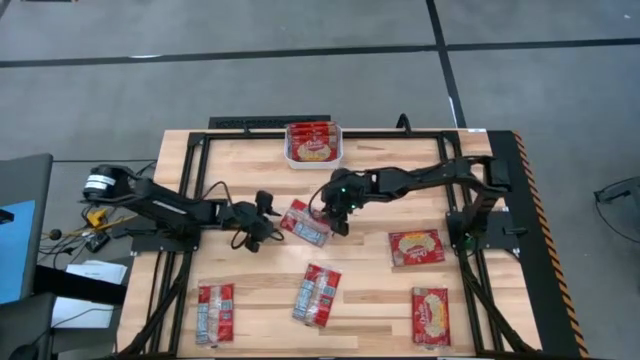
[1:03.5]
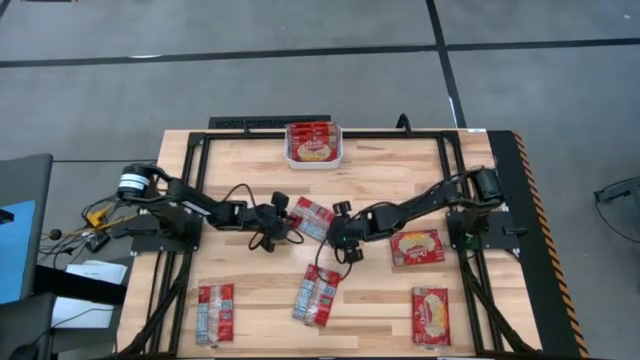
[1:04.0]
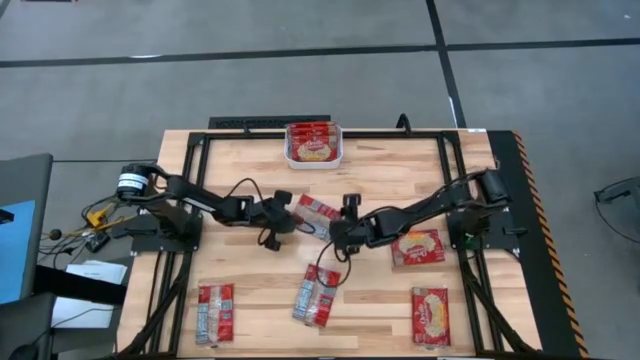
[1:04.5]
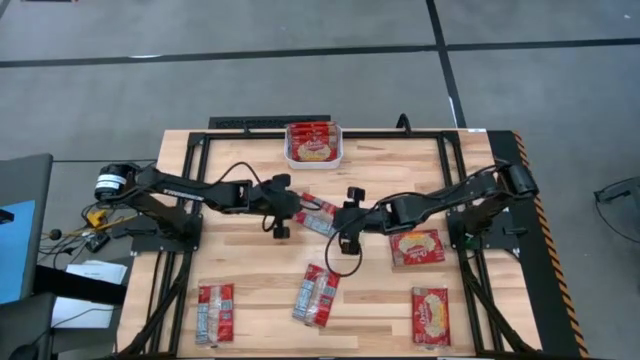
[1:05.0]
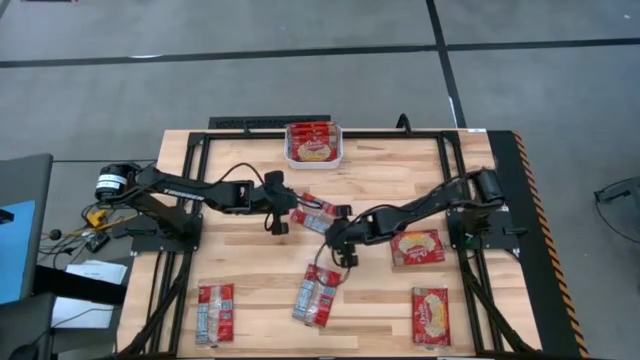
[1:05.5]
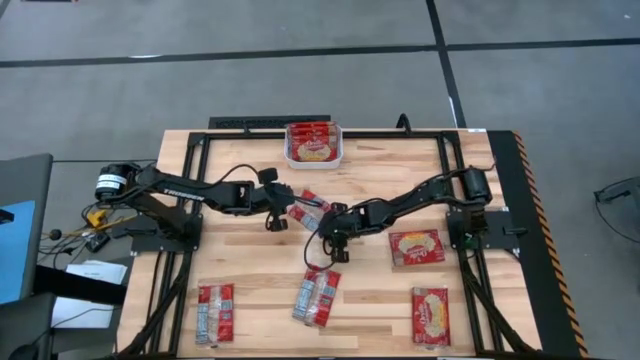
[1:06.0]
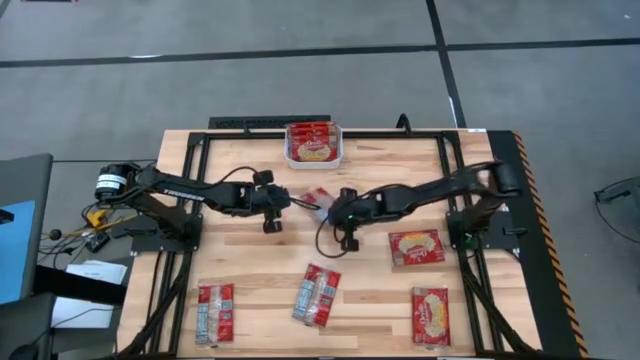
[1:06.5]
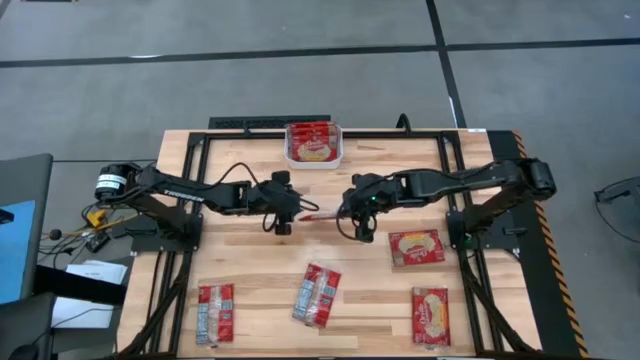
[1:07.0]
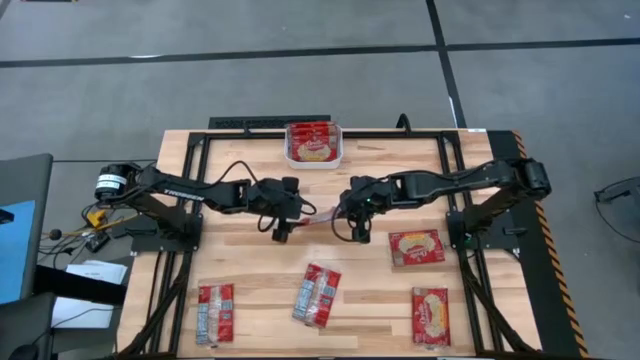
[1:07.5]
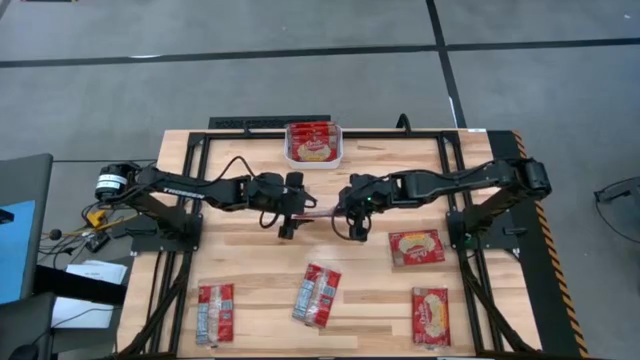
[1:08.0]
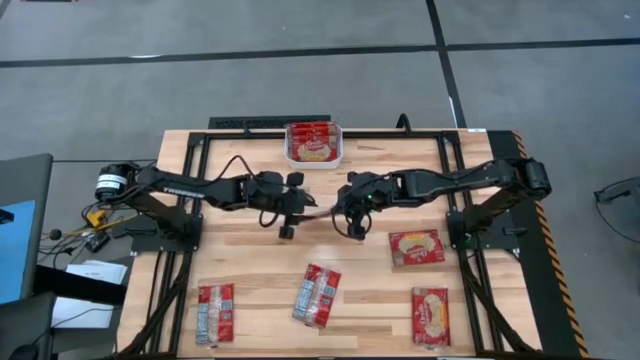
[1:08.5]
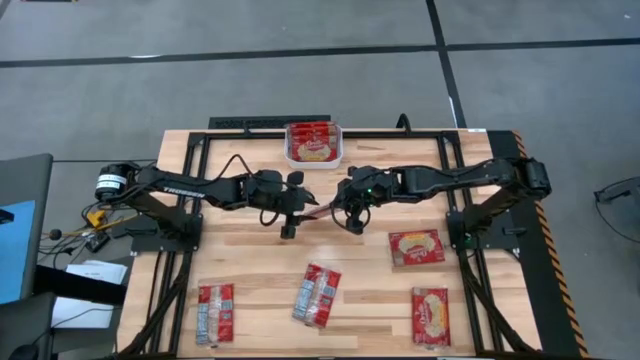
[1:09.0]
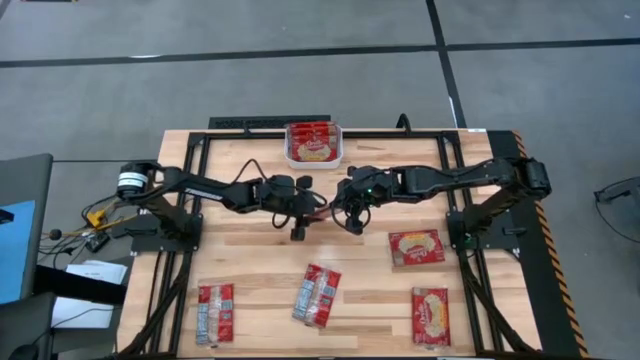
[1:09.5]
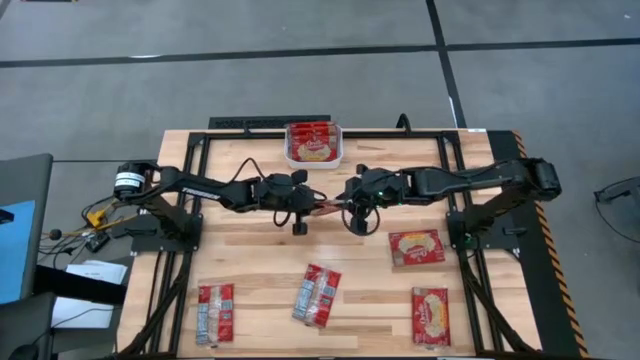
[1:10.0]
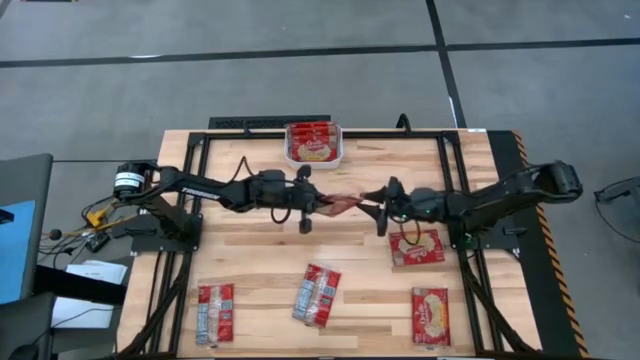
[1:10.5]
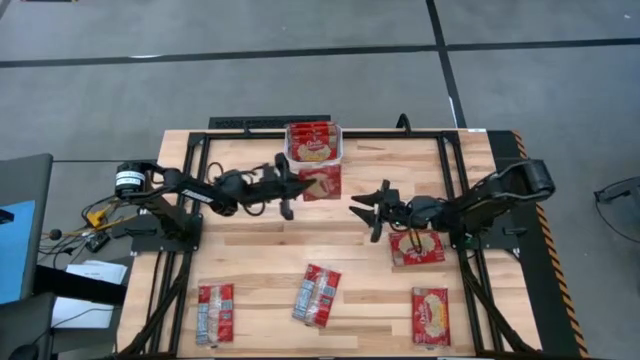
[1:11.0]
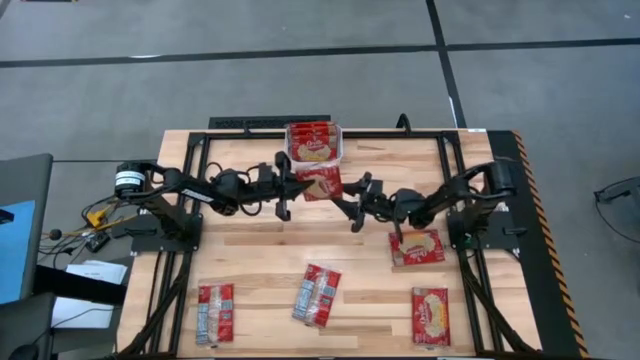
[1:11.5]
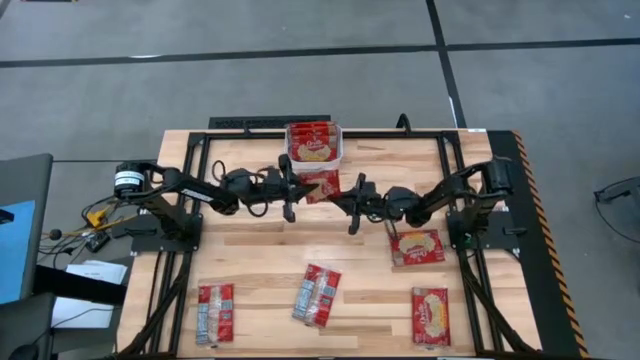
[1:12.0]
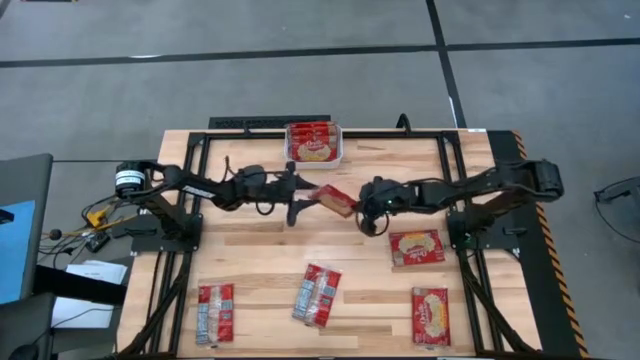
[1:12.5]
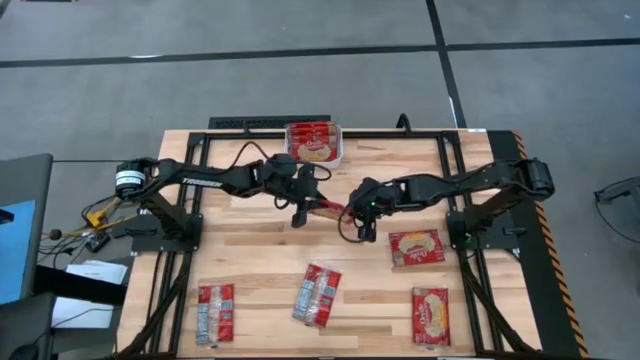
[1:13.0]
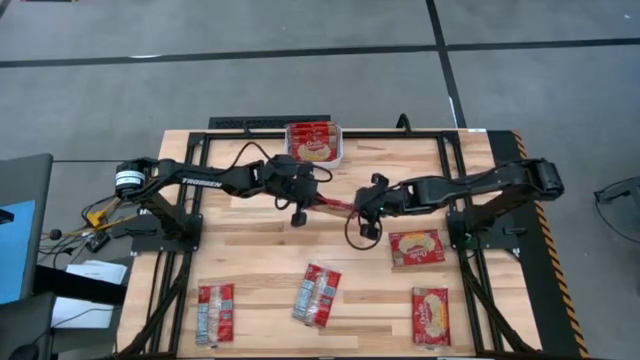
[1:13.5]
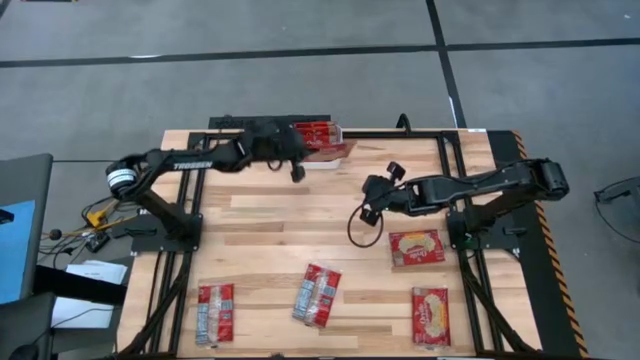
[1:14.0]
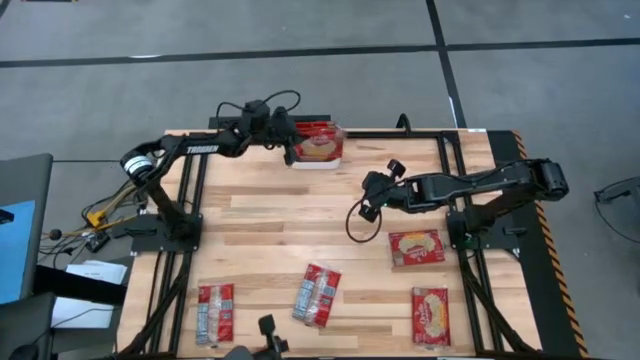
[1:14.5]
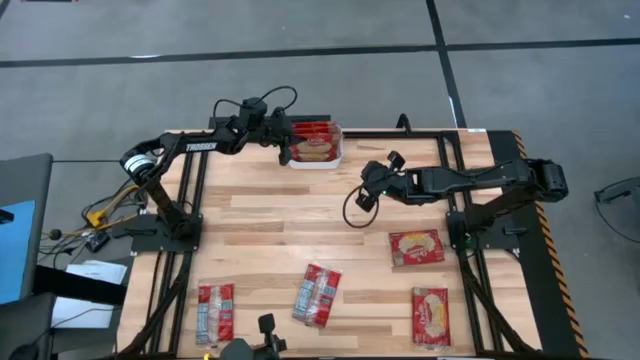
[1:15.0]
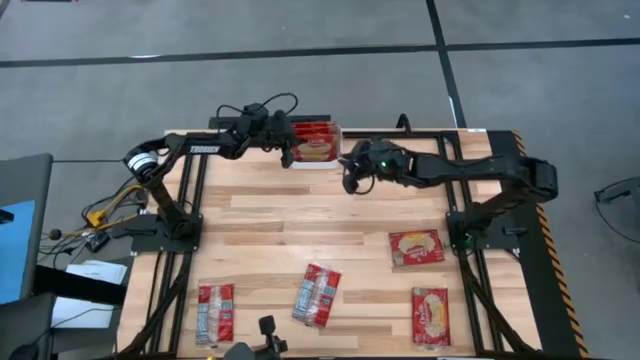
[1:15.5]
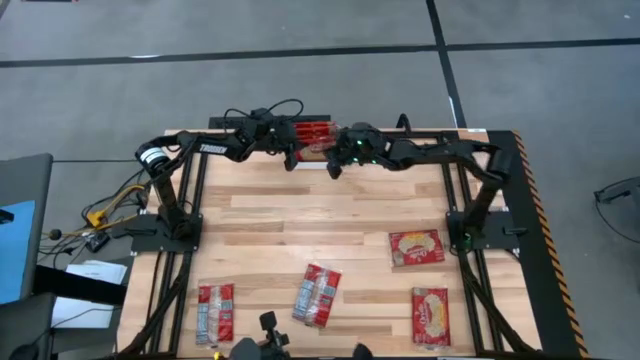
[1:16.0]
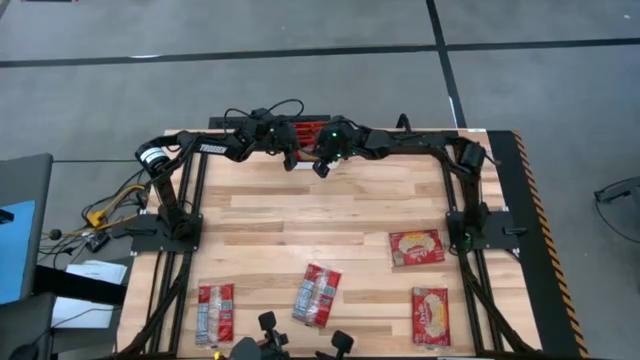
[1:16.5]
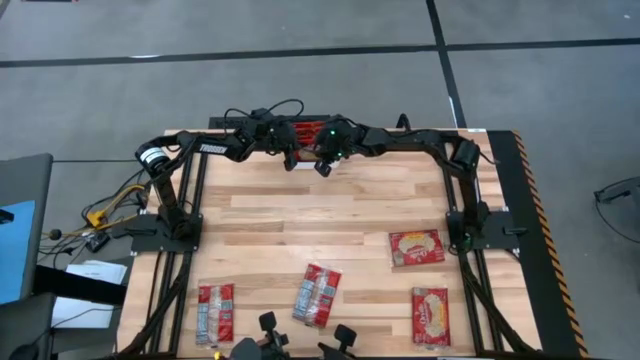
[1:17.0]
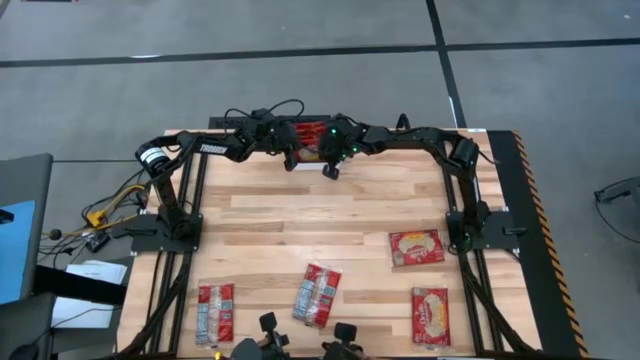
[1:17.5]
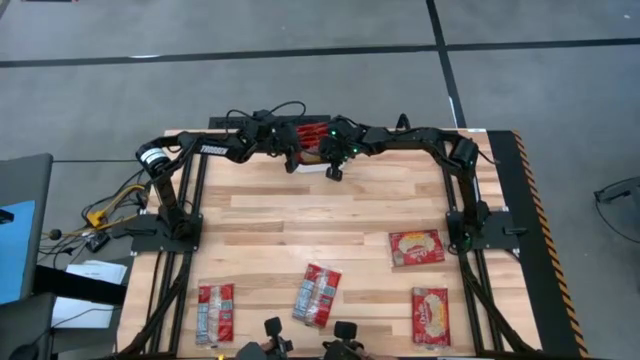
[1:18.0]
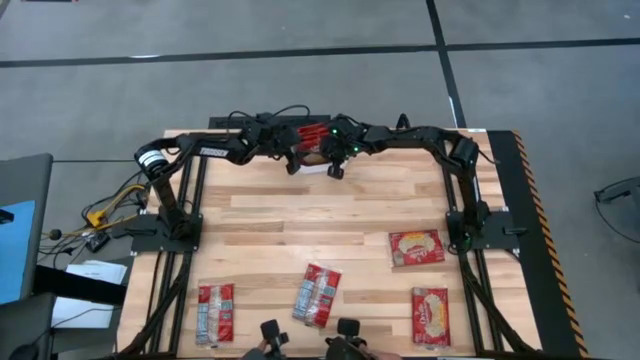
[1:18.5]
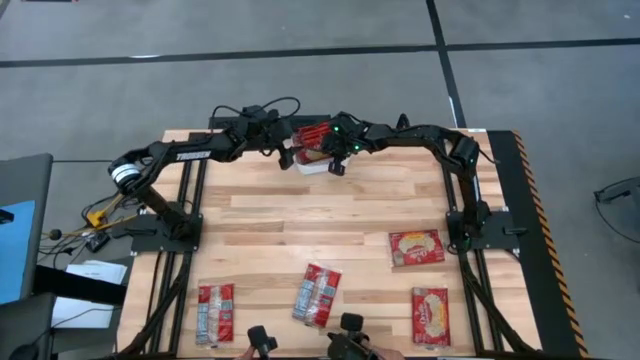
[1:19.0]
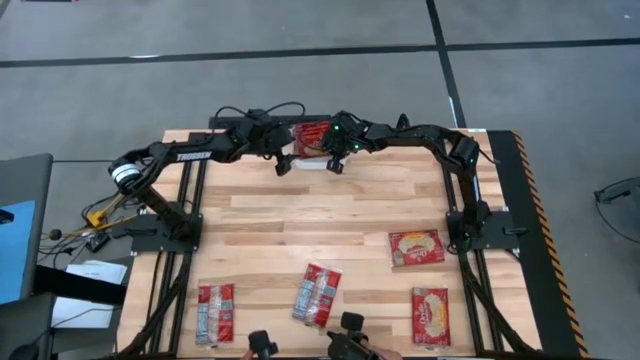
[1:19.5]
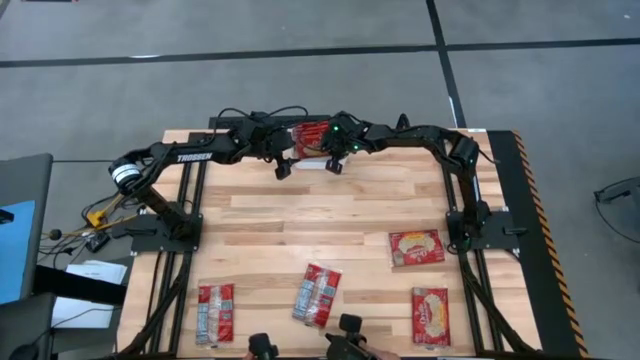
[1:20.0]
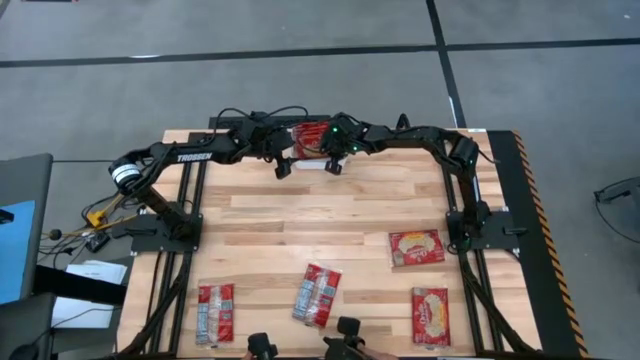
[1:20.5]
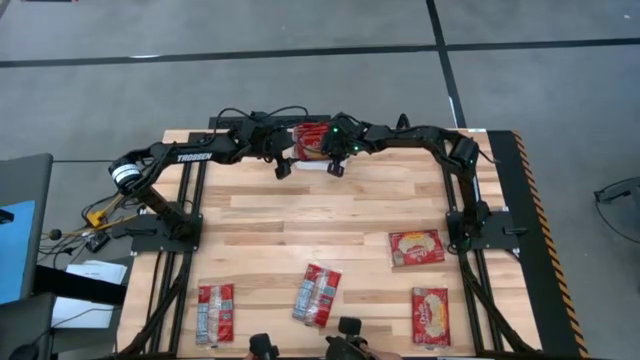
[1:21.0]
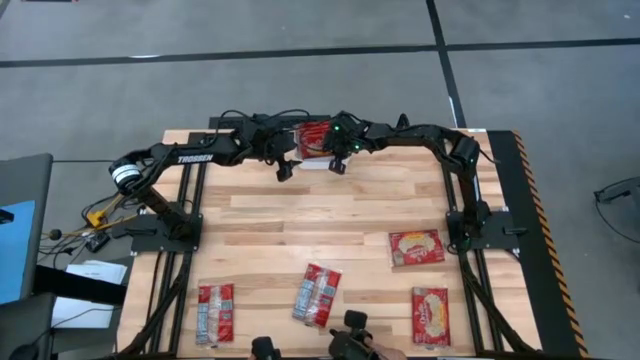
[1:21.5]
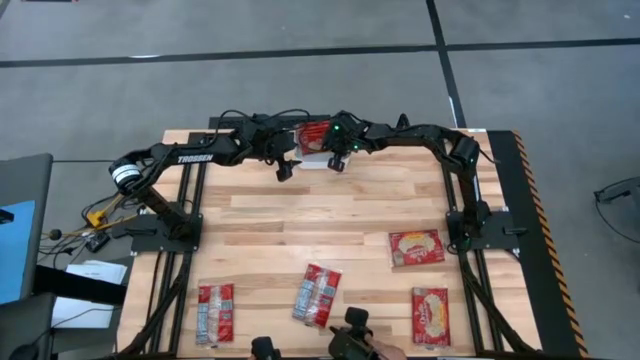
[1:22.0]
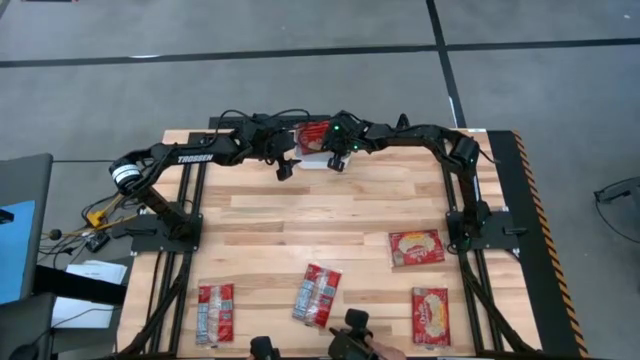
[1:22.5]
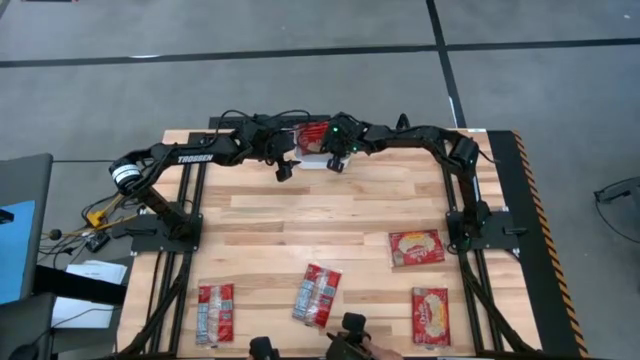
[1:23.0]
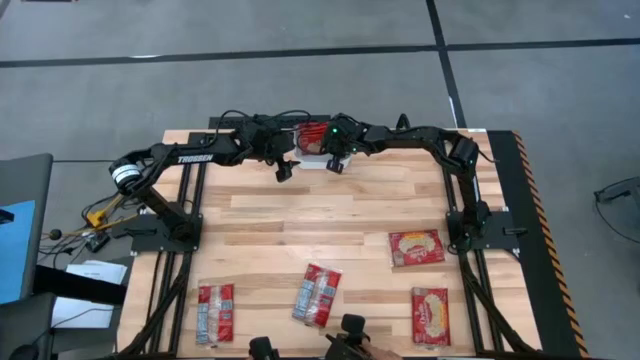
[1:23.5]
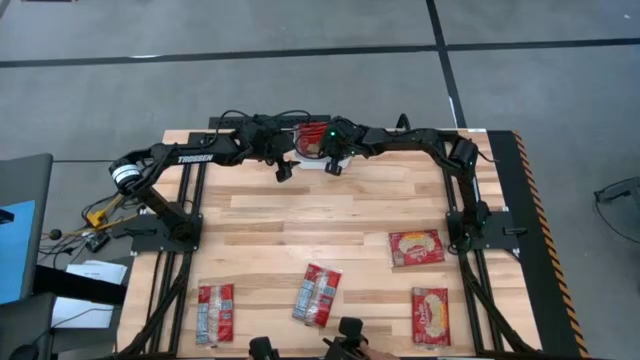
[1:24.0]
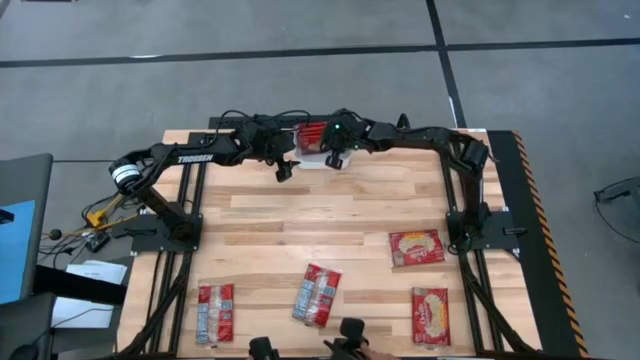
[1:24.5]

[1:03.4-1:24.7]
Task: Sort popcorn bags into baskets
Put the red popcorn bag into the white bin
